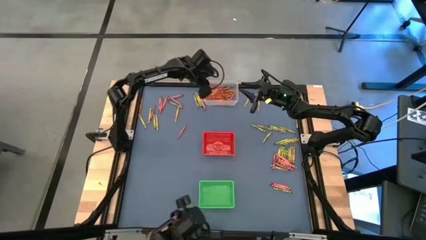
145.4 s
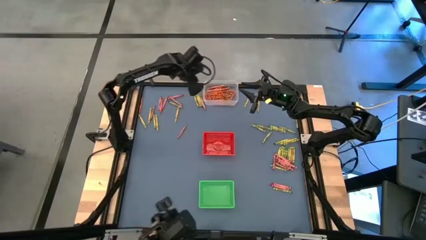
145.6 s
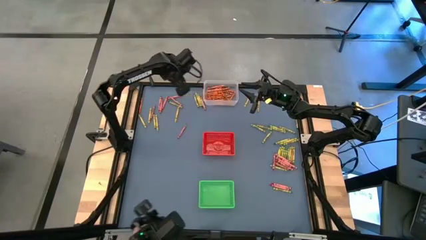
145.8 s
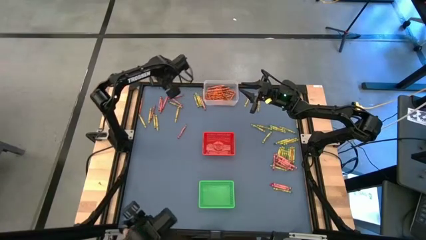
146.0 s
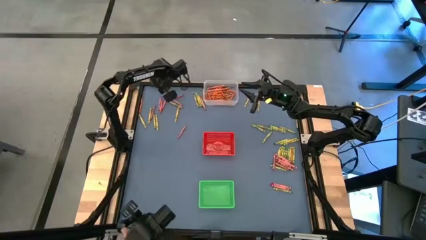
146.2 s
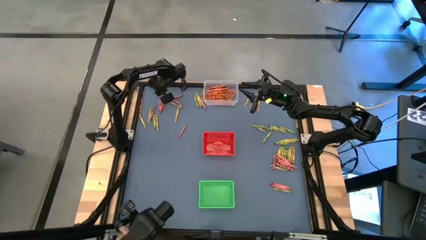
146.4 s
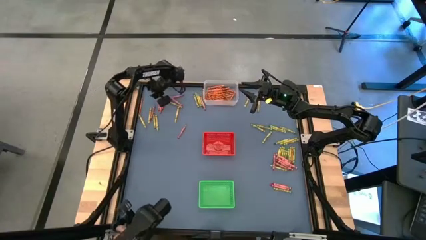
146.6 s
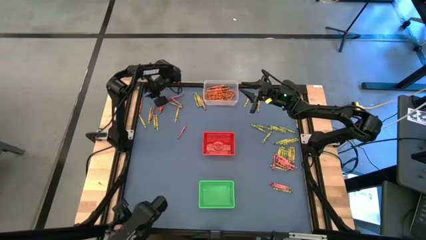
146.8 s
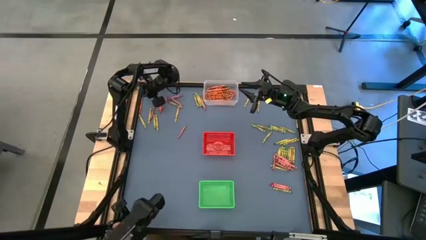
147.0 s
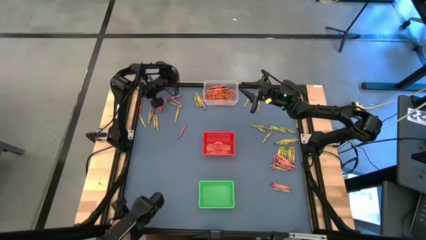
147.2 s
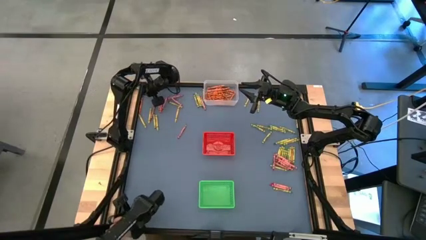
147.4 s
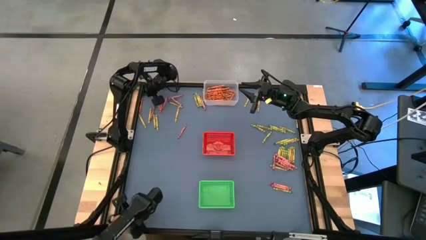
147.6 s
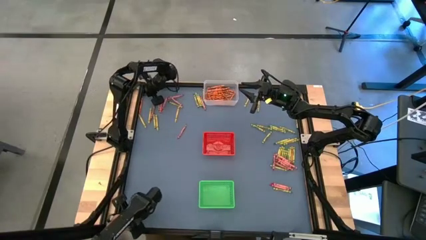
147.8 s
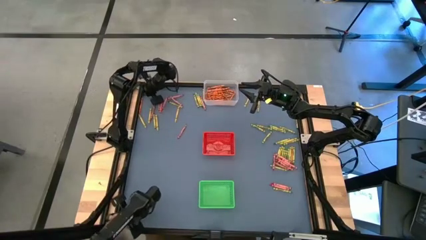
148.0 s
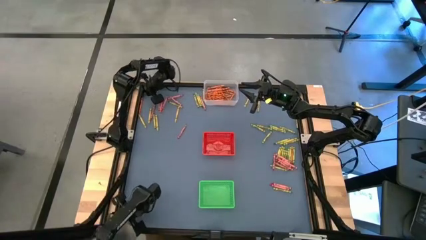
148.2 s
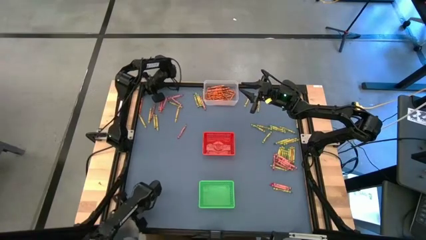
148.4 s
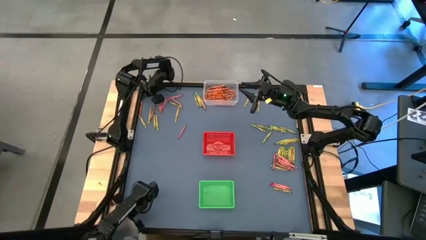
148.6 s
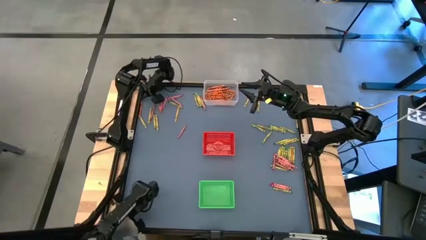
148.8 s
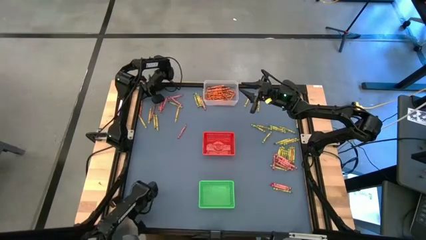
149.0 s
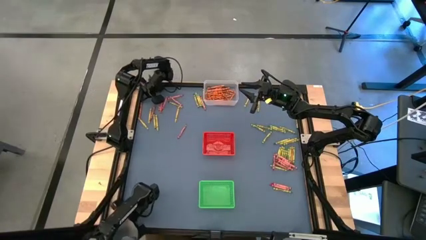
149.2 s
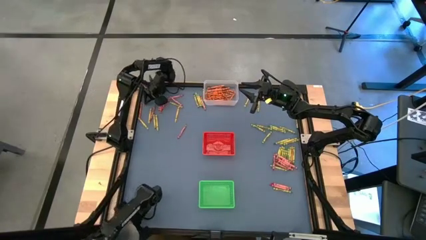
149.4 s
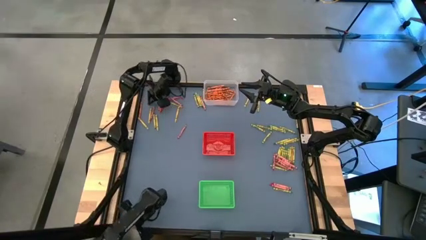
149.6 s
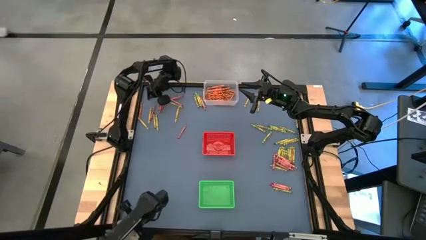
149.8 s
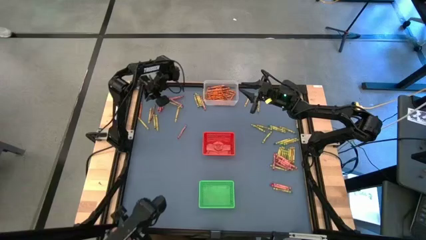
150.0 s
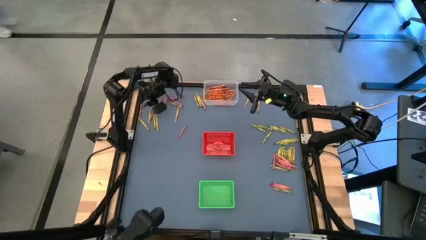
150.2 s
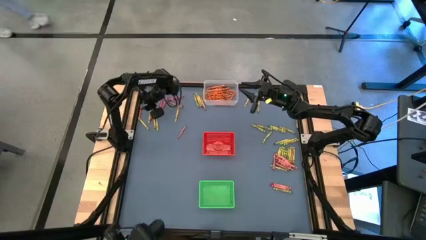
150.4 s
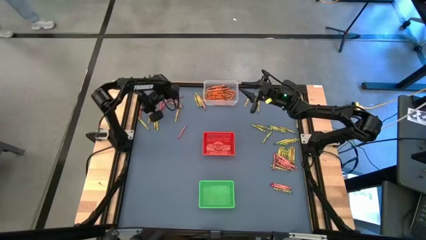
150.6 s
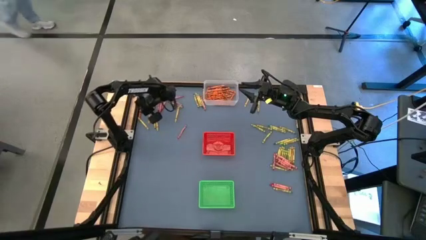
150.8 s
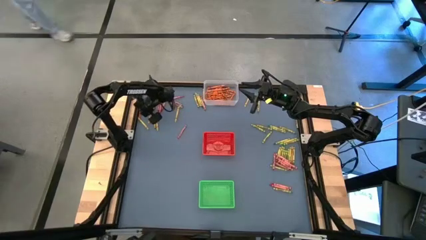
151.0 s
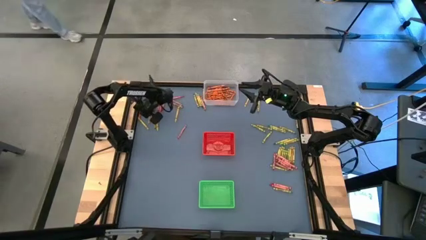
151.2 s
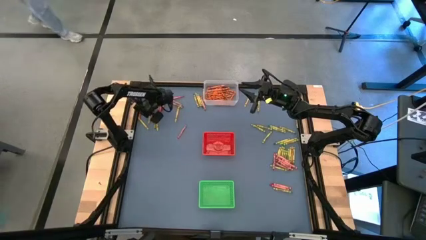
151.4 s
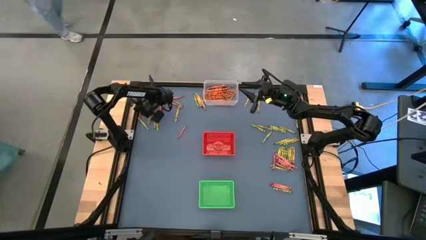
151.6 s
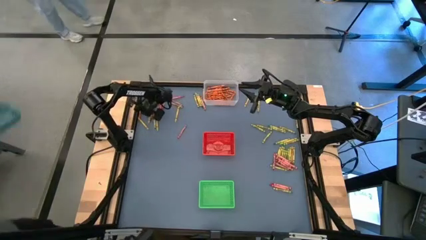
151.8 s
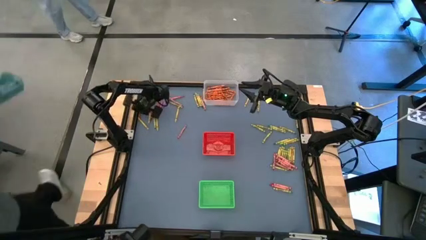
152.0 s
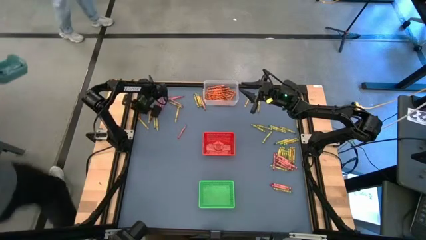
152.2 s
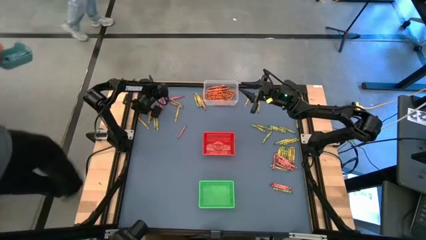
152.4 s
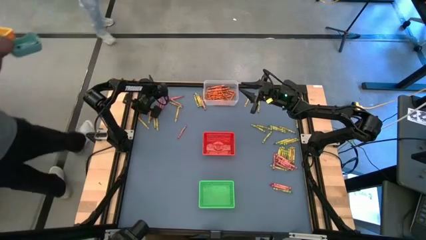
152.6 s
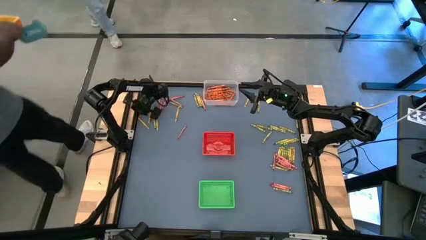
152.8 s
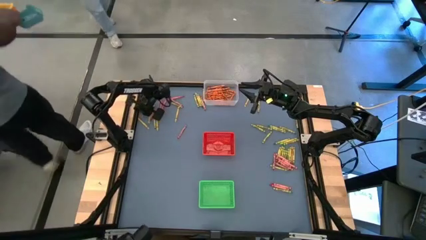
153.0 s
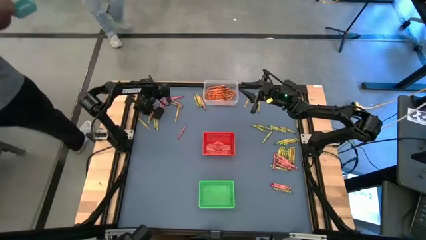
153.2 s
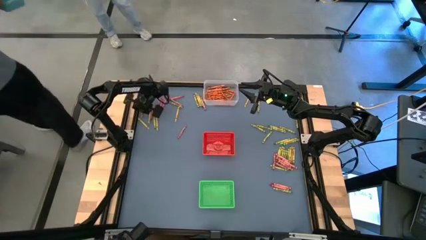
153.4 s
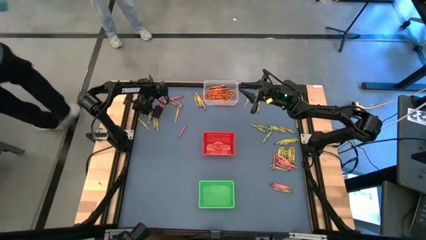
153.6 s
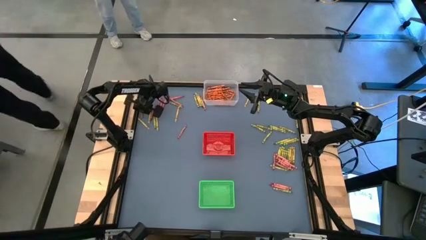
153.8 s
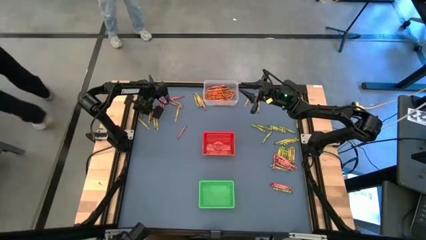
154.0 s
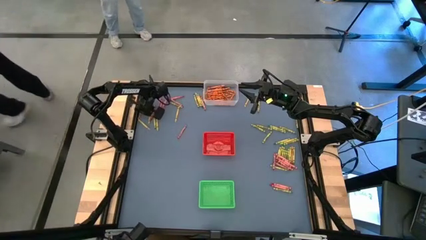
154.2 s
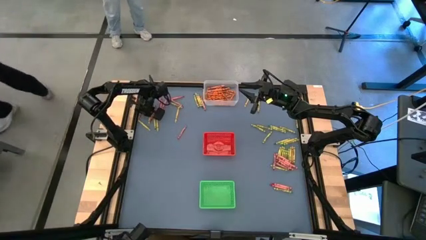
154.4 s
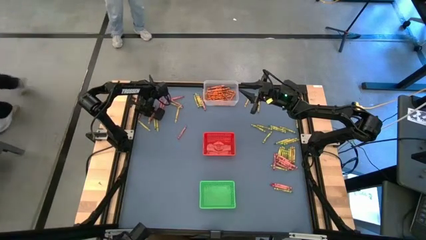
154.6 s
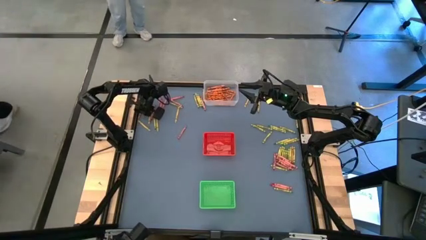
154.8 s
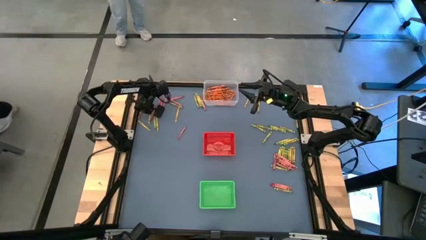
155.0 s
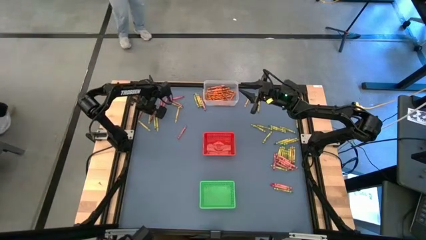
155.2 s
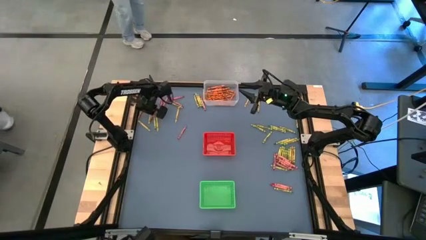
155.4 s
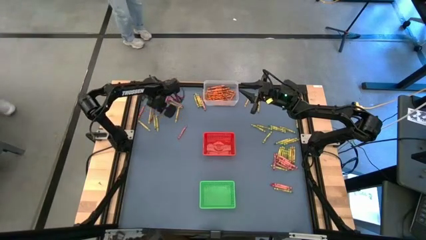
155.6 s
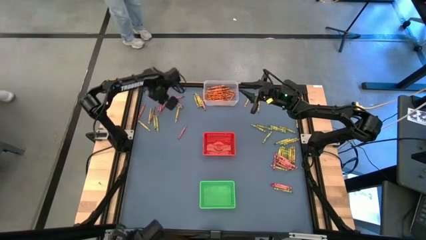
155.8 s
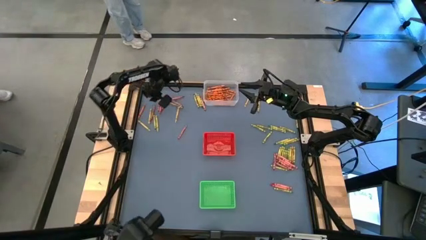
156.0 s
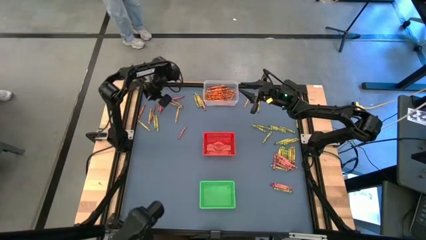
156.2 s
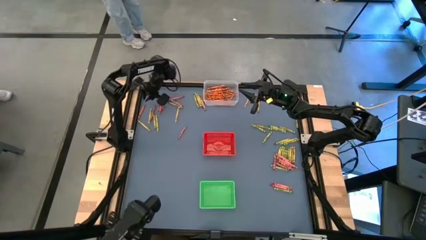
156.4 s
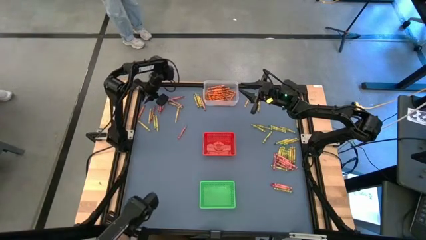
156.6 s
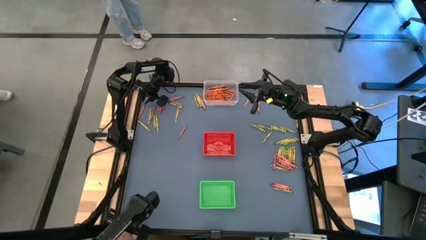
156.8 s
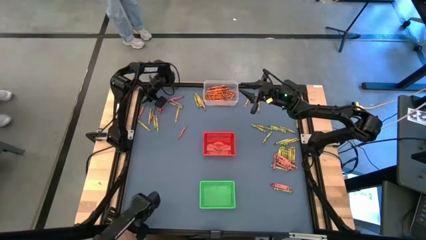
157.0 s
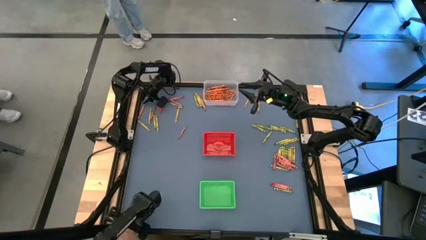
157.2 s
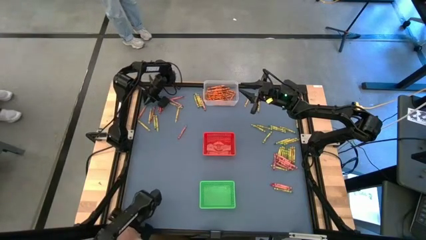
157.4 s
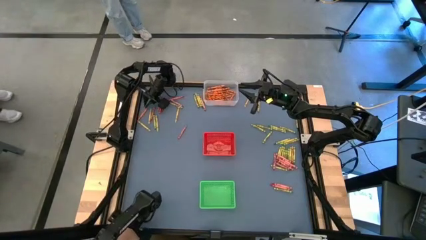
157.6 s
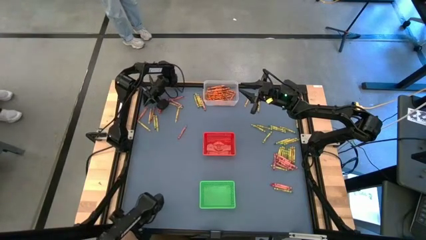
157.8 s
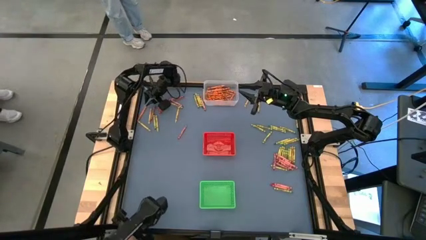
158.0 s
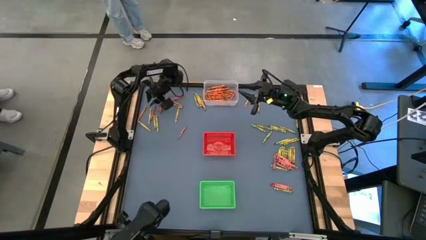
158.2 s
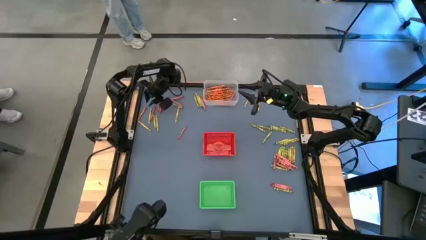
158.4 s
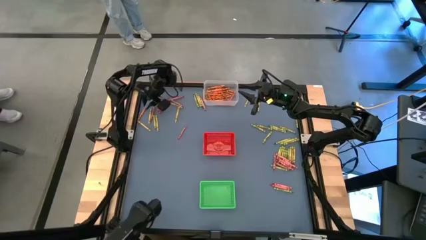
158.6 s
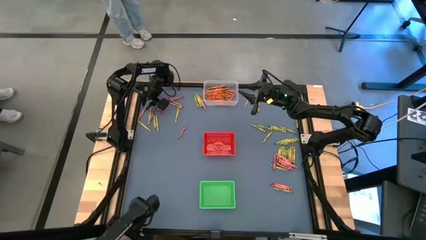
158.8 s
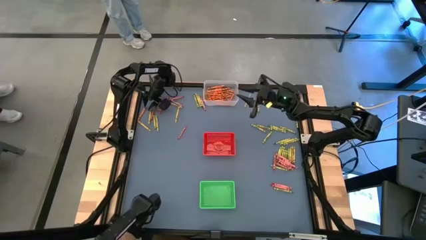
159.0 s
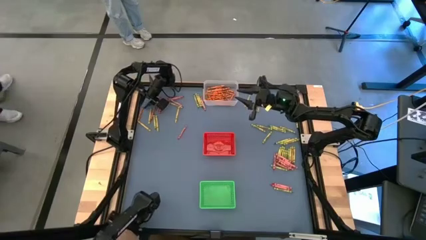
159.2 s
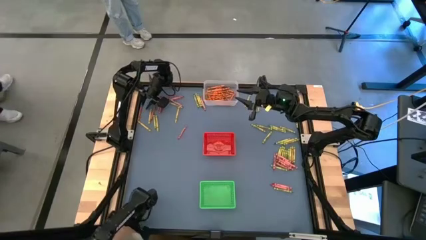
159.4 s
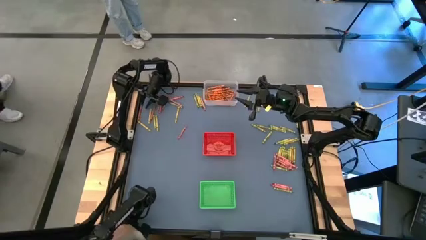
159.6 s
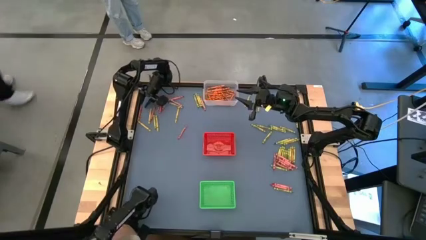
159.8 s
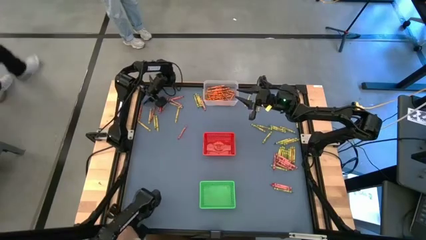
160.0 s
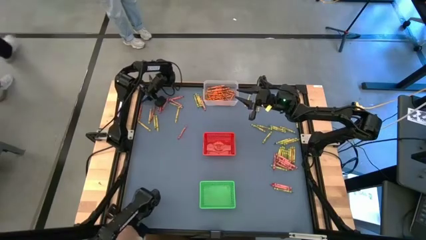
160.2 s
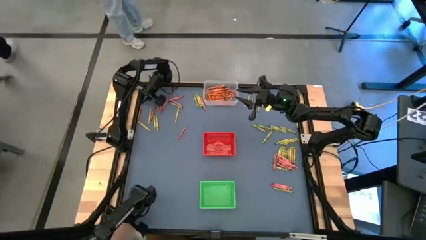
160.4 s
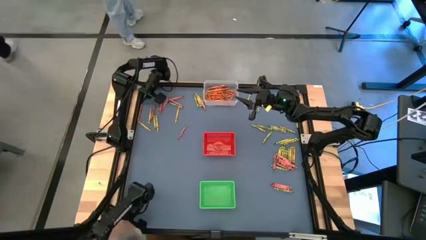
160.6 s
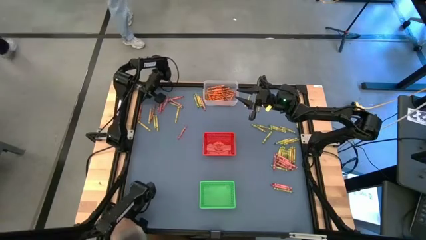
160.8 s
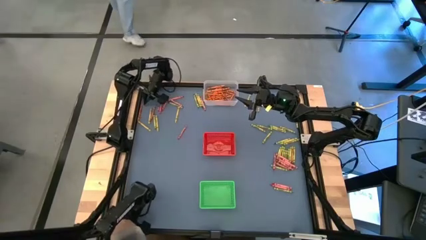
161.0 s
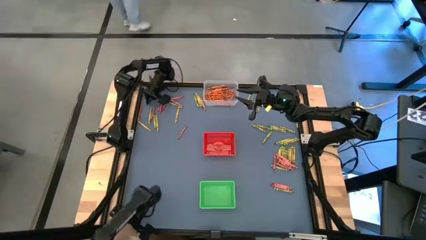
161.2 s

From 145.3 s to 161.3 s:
Task: Sort crayons
Put the orange crayon into the transparent bin
